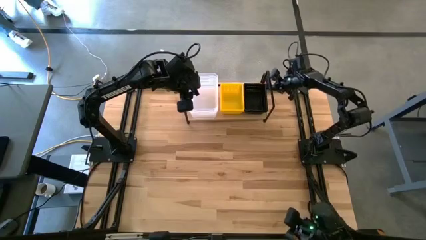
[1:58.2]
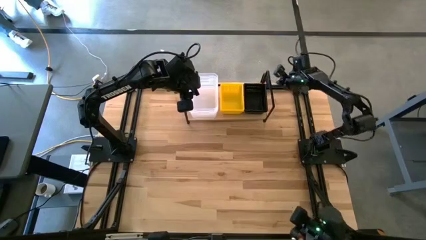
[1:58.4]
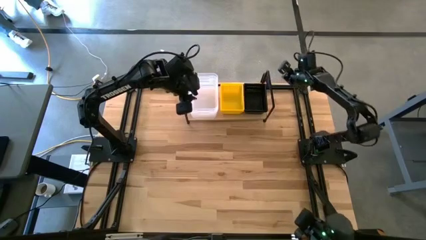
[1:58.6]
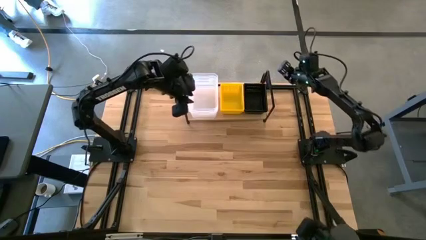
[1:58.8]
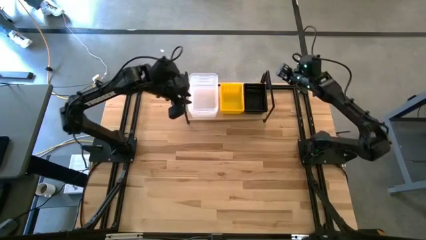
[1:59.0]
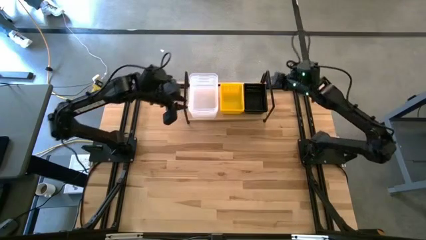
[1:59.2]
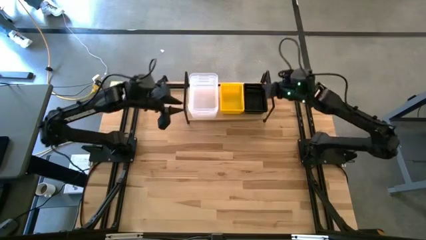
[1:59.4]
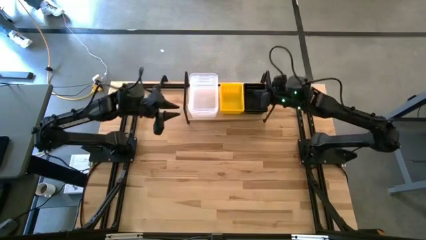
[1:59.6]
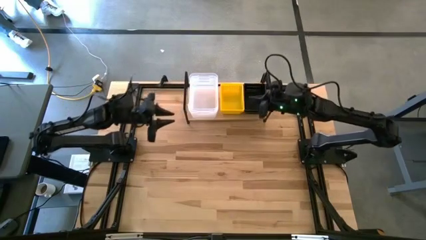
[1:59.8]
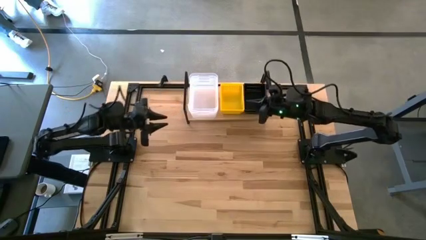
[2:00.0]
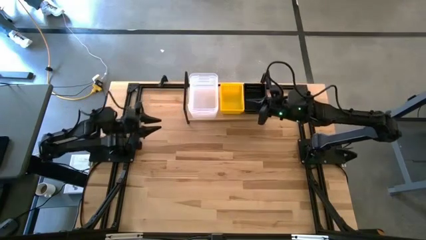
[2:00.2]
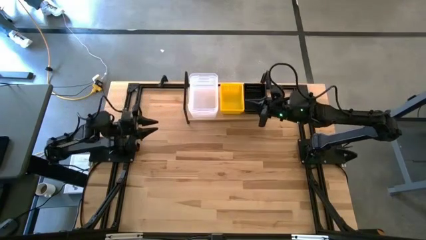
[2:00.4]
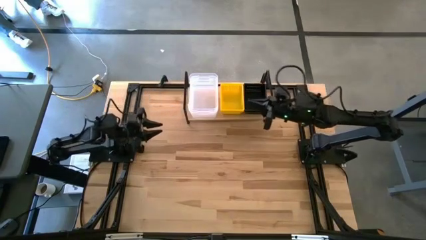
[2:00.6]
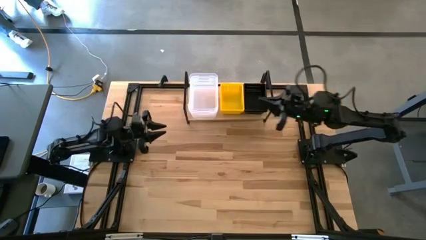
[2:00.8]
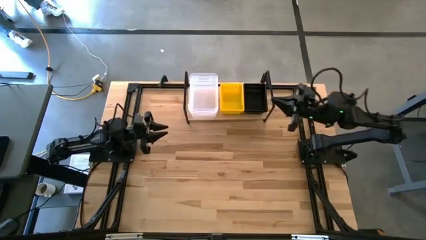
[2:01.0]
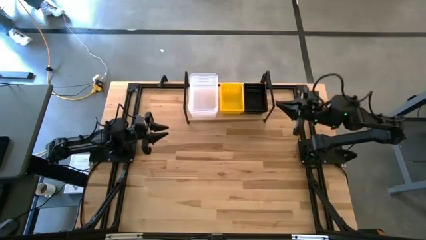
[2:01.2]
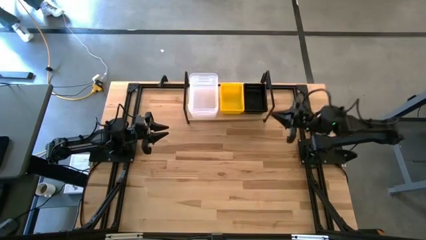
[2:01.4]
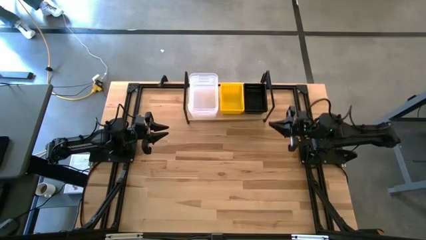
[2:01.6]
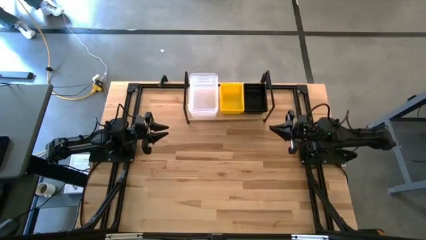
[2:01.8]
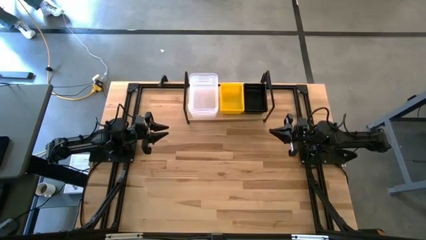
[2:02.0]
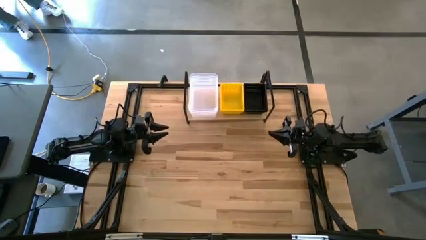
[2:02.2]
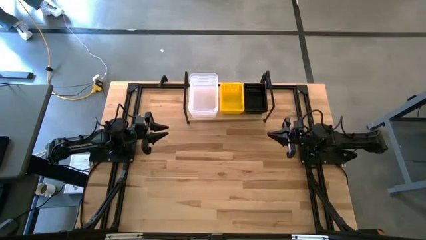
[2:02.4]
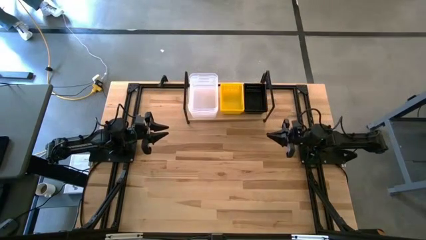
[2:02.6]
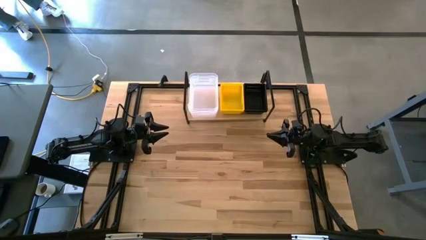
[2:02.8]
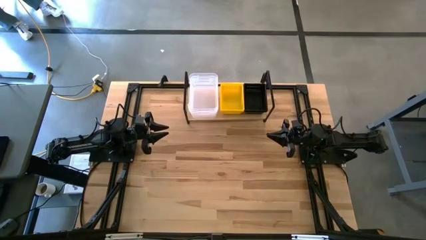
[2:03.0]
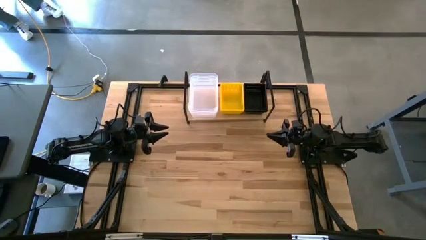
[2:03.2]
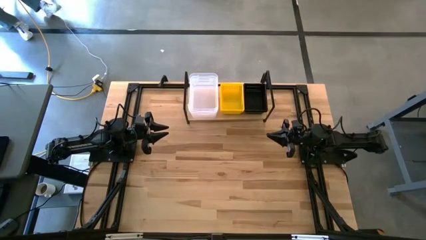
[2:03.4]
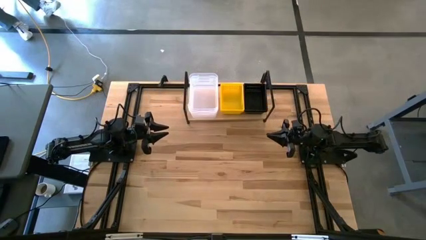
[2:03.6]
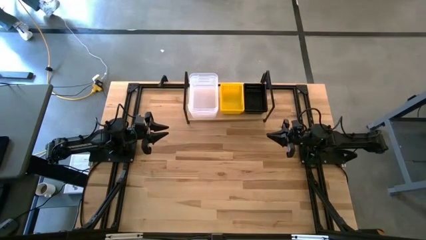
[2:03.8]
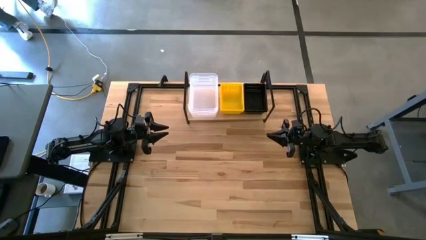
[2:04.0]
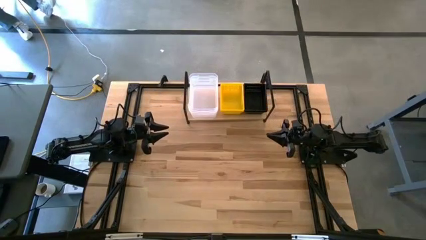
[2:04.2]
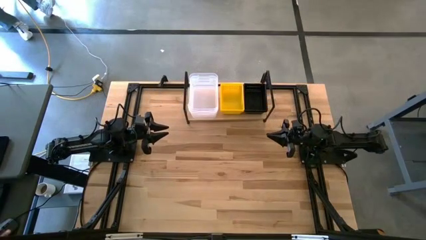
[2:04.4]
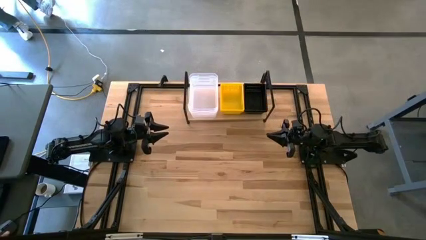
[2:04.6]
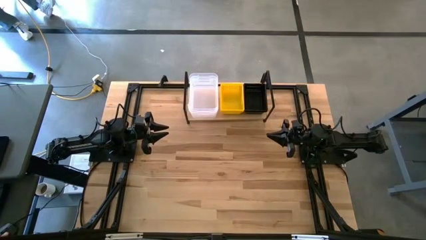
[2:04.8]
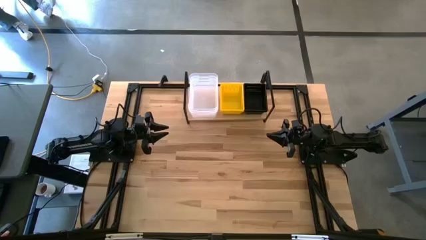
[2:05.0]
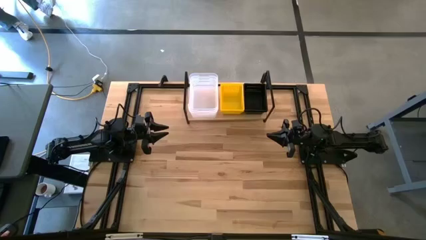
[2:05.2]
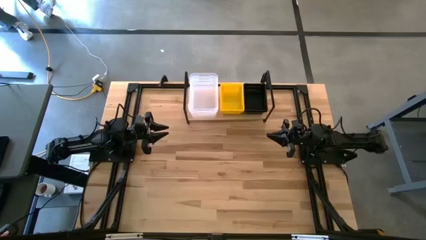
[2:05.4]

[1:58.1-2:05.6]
Task: Stack baskets on shelf by color
Return to Home Position

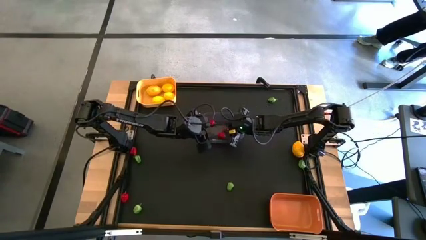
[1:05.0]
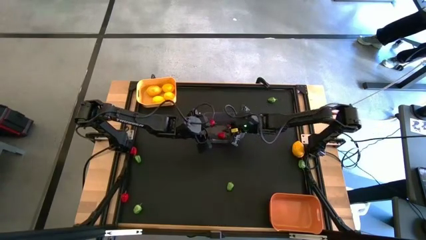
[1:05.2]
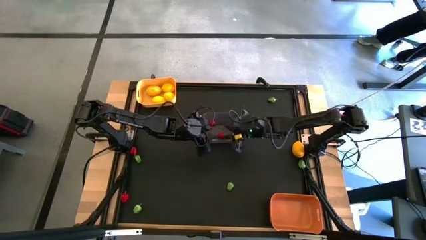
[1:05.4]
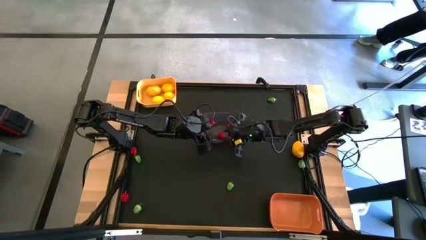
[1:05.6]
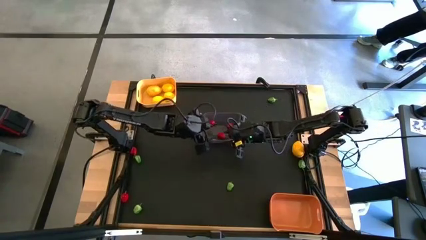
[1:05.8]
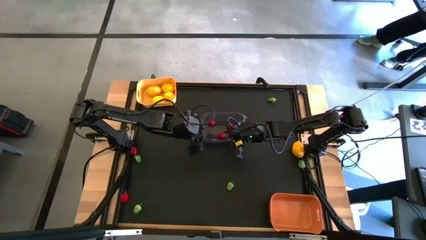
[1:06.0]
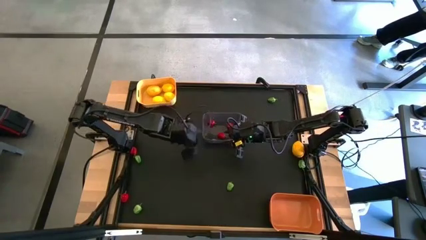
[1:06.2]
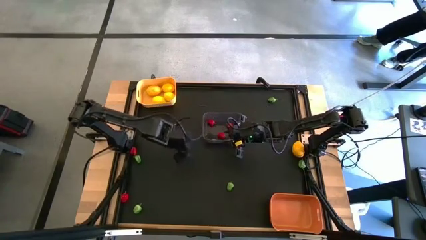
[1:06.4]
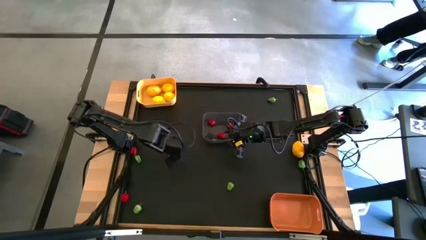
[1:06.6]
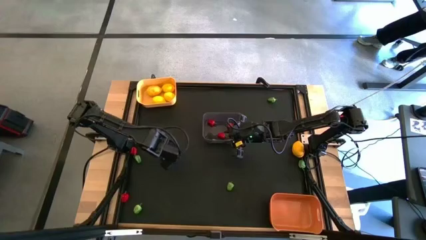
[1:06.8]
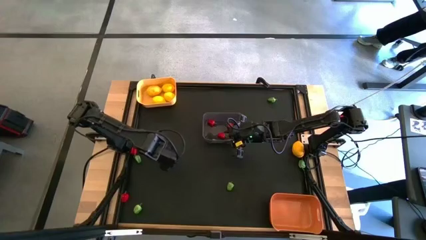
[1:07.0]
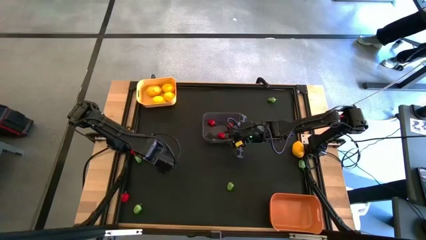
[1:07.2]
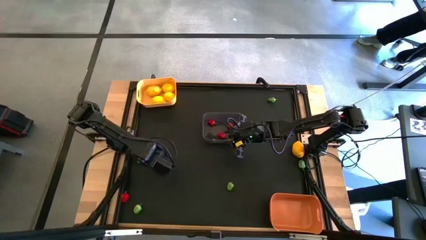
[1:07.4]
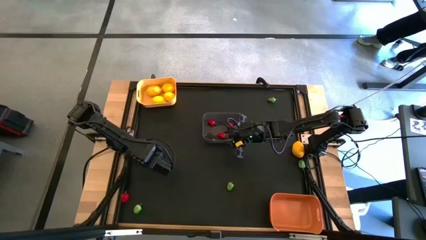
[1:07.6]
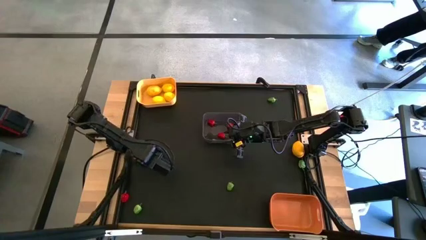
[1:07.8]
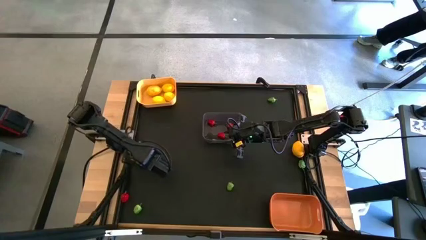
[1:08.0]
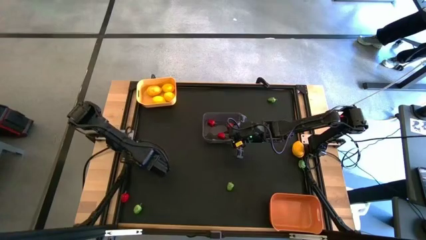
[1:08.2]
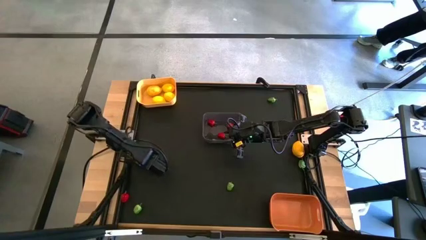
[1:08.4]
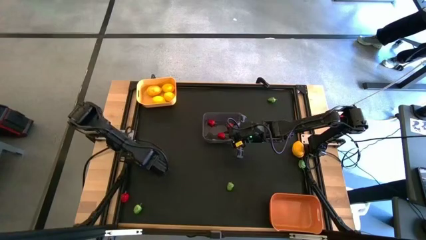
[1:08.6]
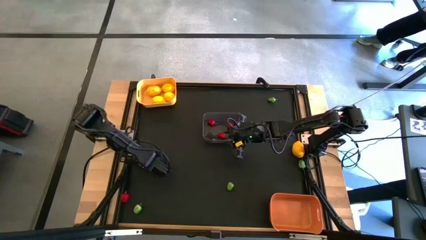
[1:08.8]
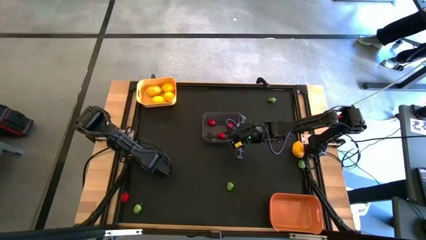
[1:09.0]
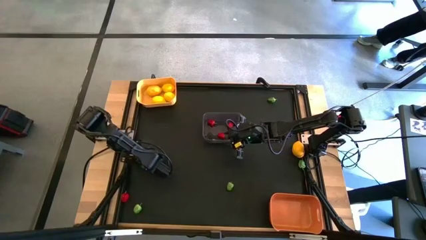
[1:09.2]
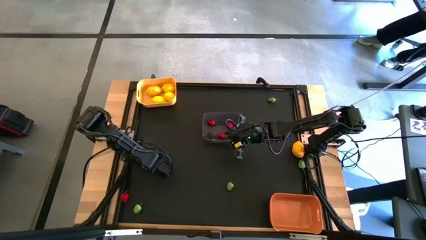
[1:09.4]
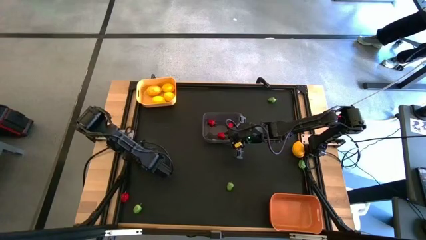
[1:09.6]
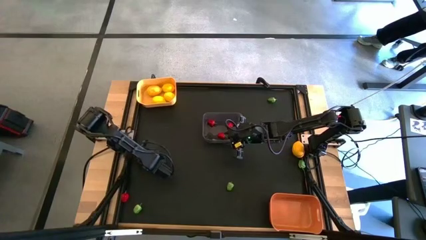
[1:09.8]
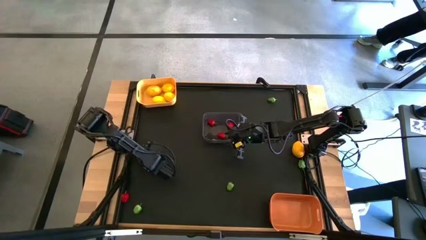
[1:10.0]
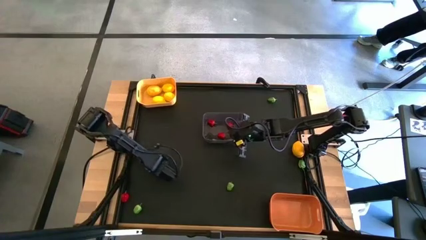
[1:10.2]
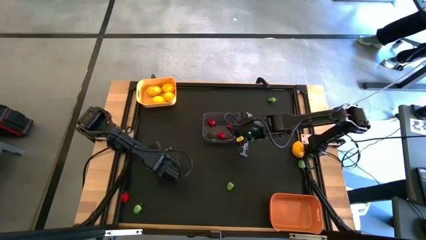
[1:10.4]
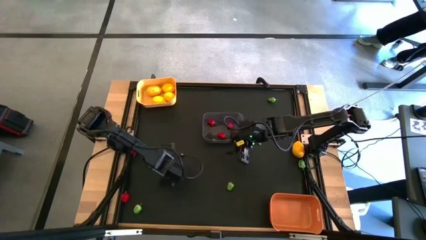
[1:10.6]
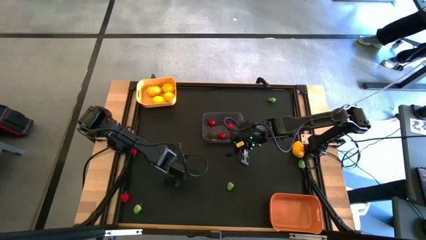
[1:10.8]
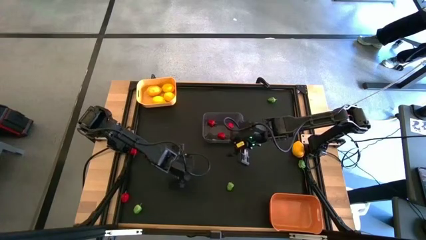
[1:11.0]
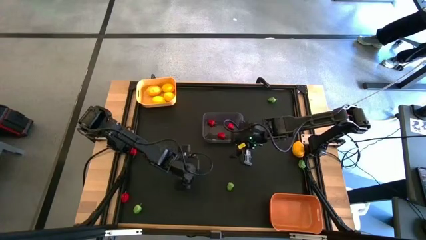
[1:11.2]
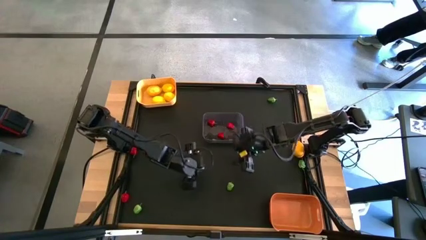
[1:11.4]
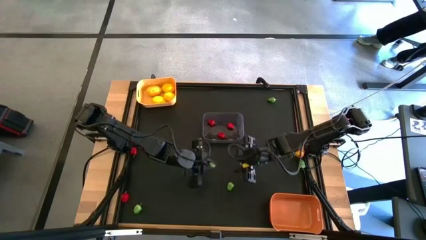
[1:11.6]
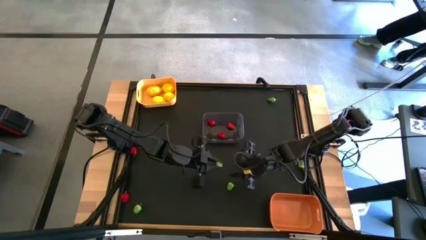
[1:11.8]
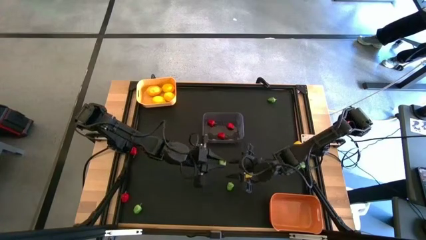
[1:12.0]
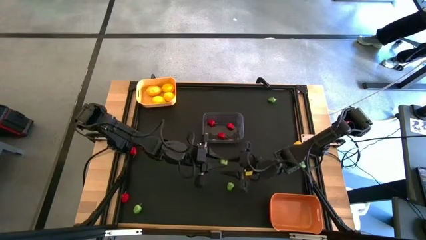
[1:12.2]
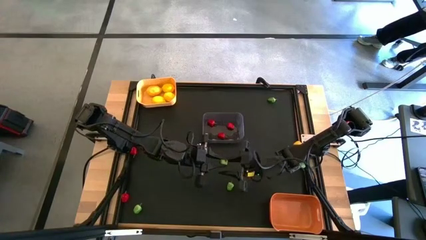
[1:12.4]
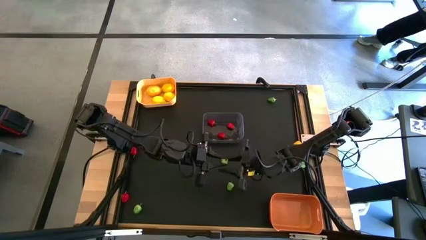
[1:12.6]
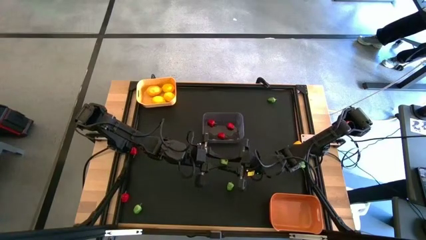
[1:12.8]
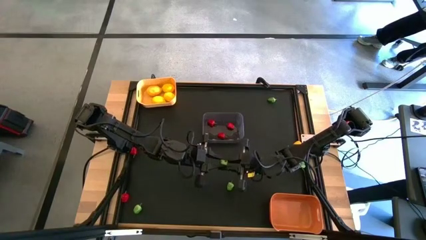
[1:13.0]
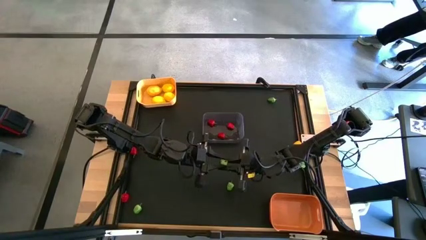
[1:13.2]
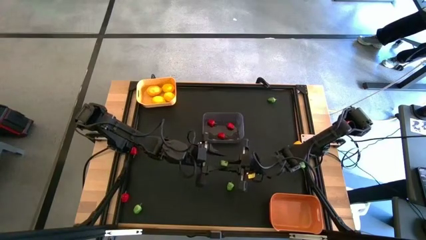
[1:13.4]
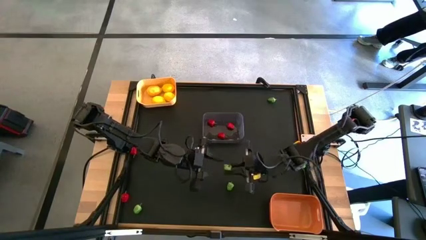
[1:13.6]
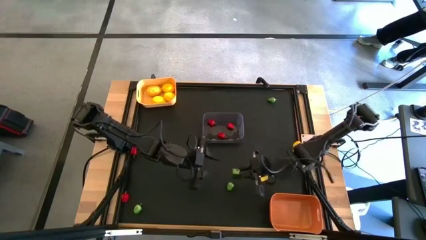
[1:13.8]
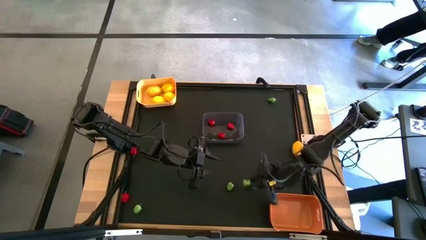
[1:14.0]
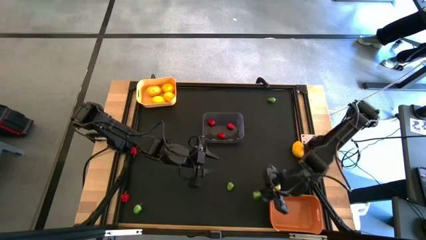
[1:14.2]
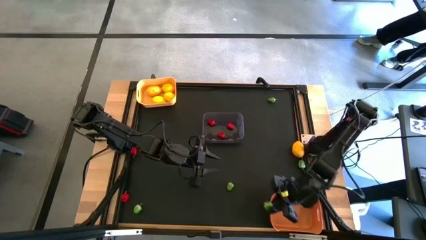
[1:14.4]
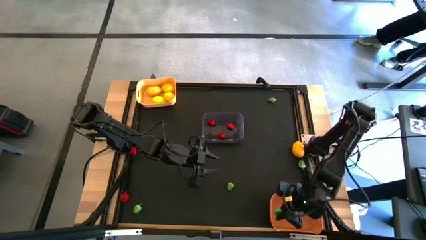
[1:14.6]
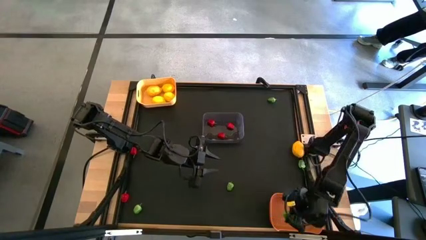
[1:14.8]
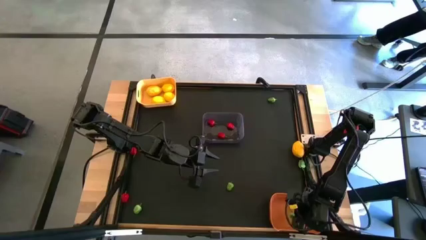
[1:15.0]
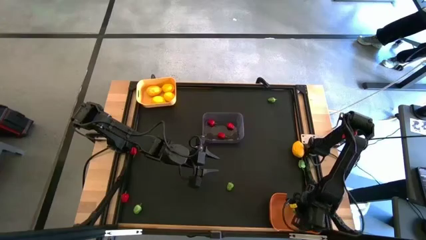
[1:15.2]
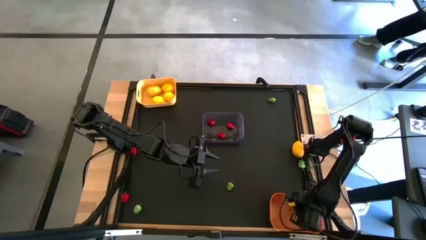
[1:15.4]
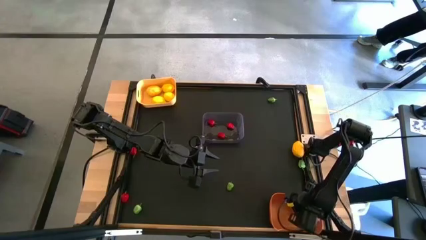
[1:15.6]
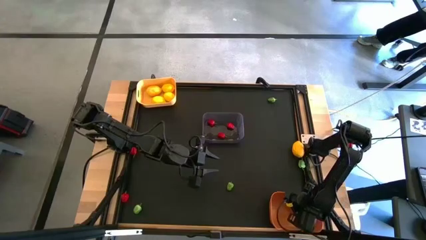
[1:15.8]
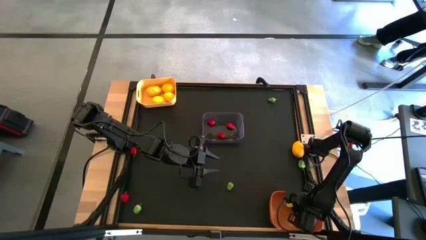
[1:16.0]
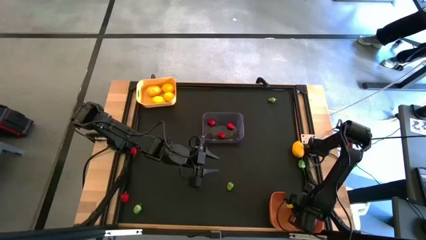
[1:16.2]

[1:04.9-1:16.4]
Task: Sort produce into baskets
Put the green bell pepper into the orange bin
